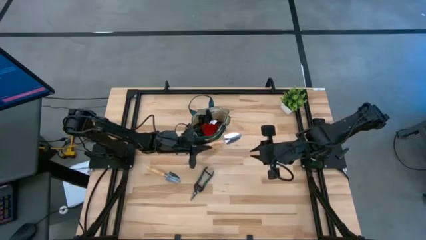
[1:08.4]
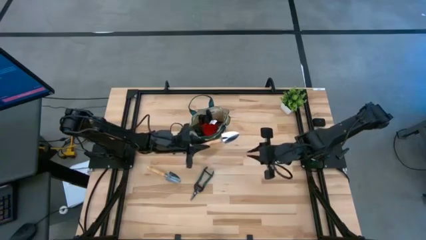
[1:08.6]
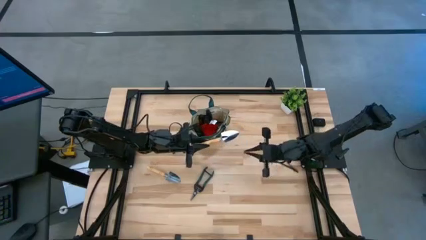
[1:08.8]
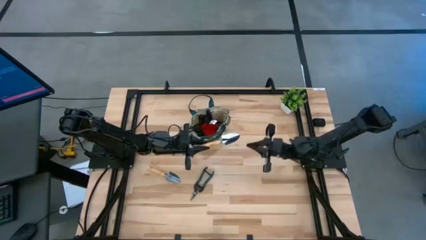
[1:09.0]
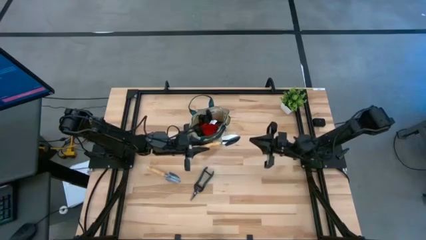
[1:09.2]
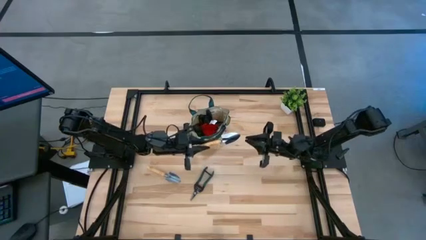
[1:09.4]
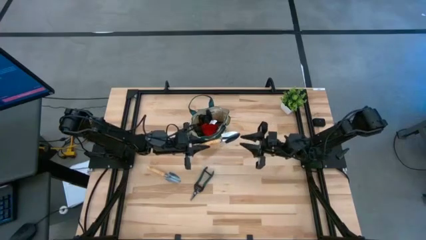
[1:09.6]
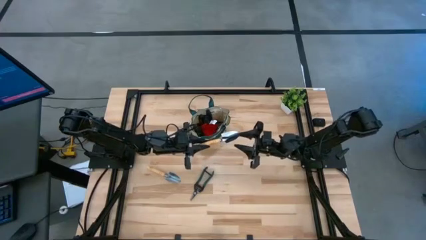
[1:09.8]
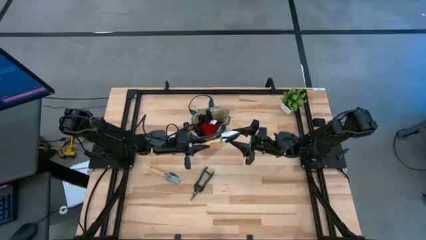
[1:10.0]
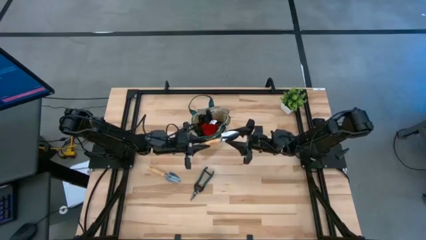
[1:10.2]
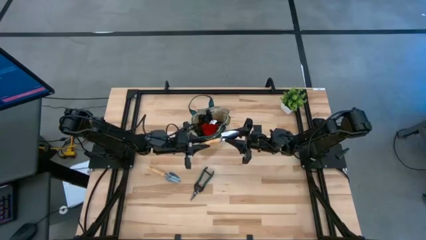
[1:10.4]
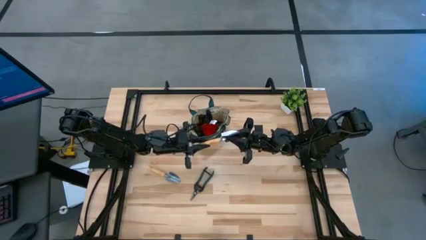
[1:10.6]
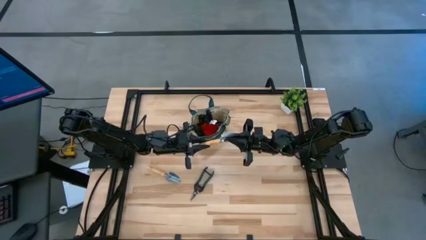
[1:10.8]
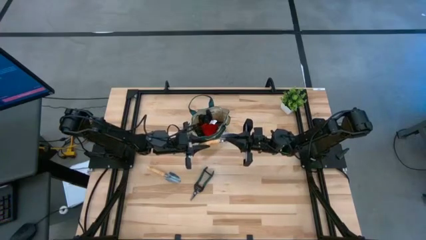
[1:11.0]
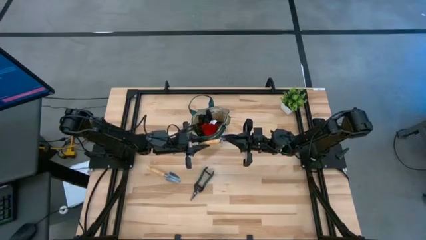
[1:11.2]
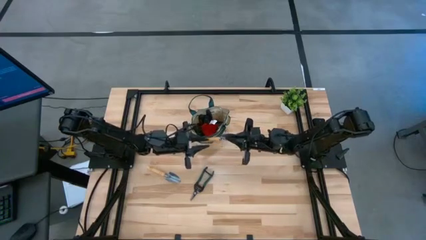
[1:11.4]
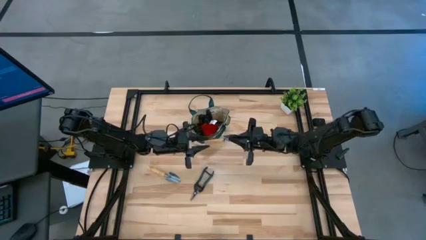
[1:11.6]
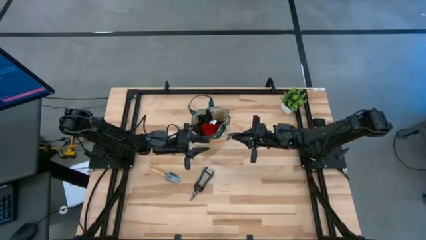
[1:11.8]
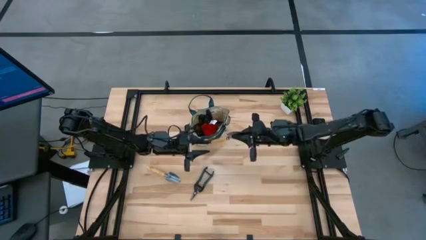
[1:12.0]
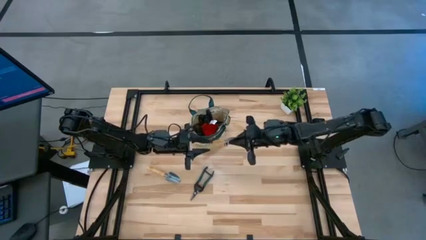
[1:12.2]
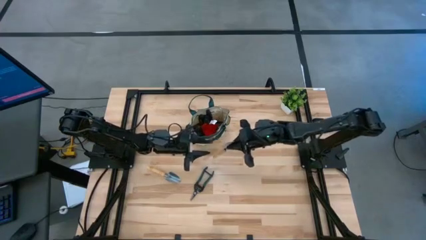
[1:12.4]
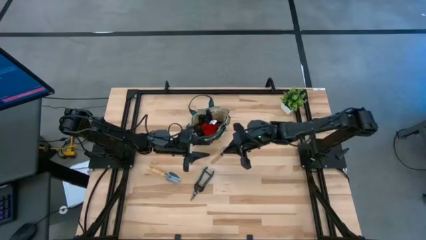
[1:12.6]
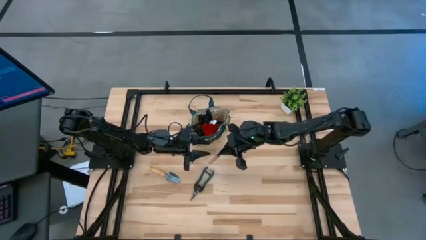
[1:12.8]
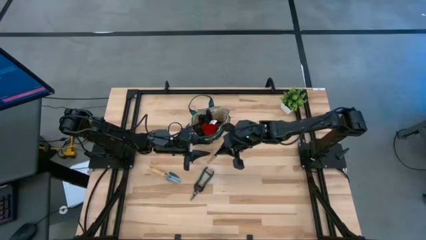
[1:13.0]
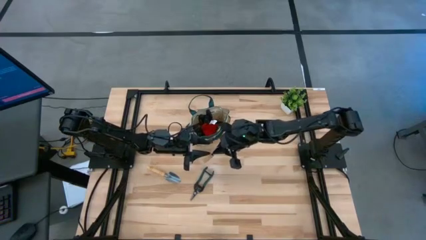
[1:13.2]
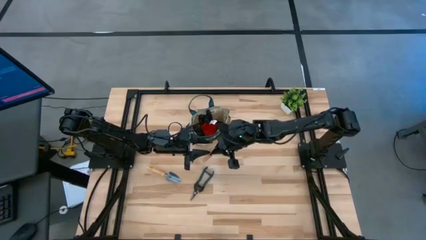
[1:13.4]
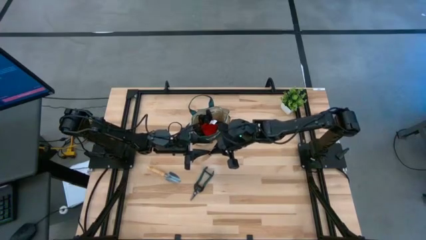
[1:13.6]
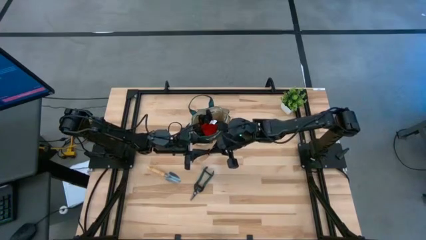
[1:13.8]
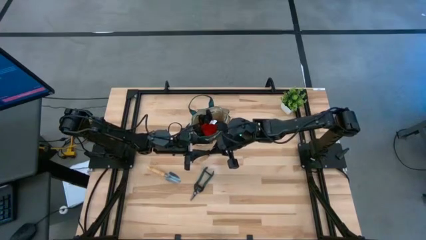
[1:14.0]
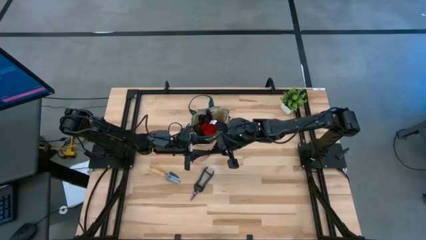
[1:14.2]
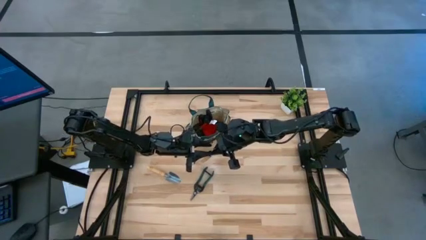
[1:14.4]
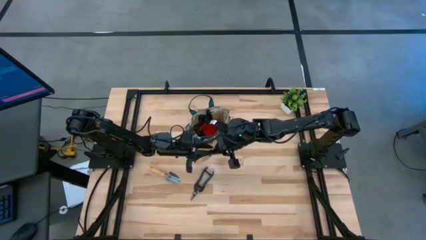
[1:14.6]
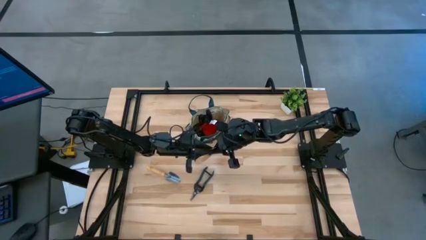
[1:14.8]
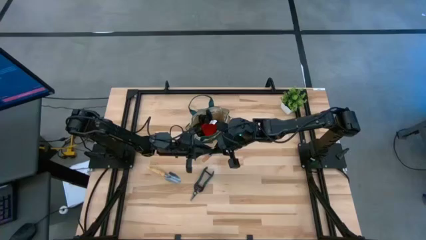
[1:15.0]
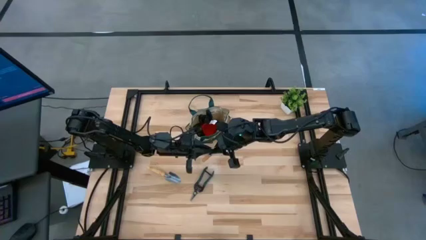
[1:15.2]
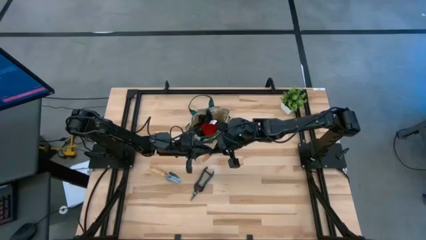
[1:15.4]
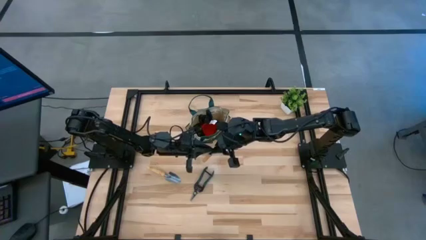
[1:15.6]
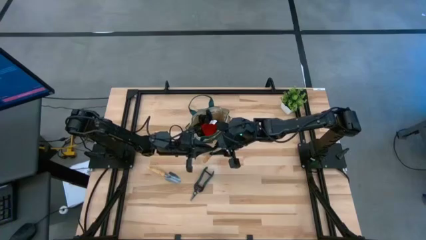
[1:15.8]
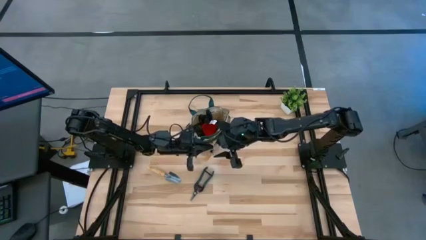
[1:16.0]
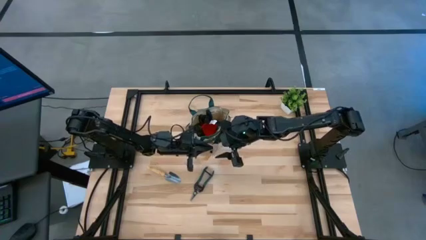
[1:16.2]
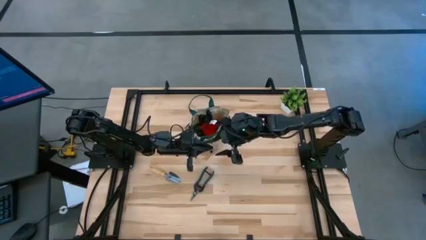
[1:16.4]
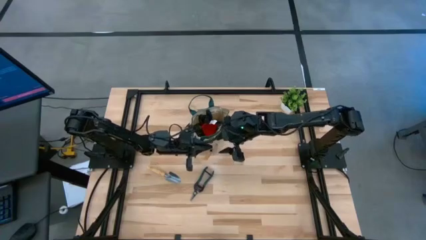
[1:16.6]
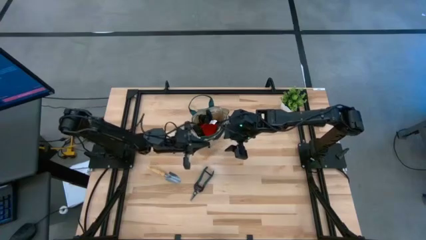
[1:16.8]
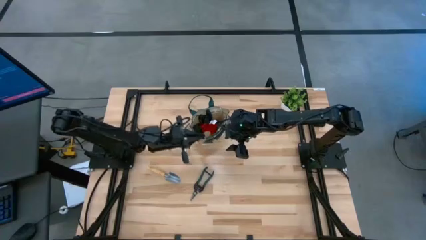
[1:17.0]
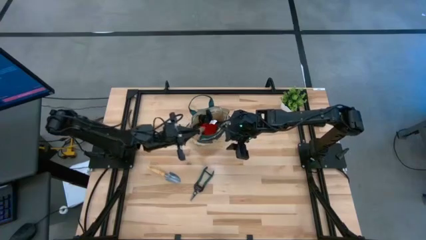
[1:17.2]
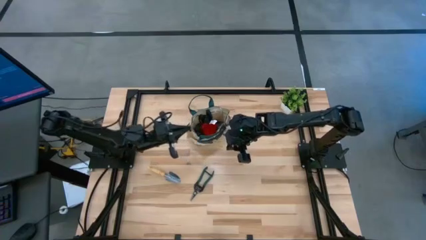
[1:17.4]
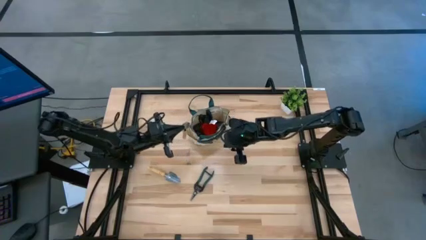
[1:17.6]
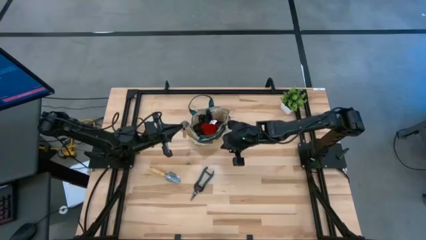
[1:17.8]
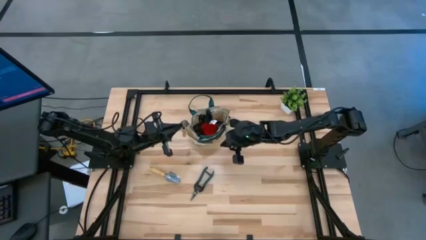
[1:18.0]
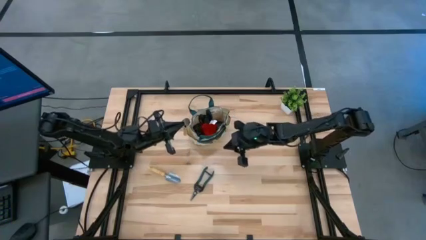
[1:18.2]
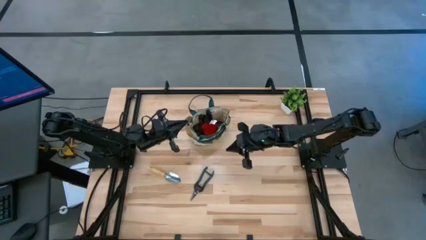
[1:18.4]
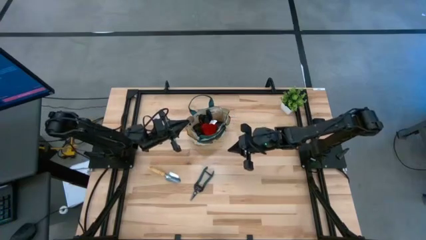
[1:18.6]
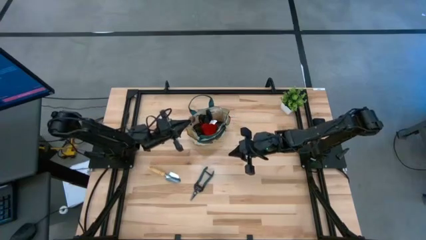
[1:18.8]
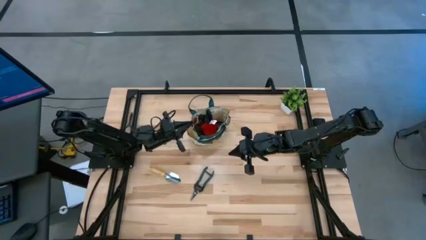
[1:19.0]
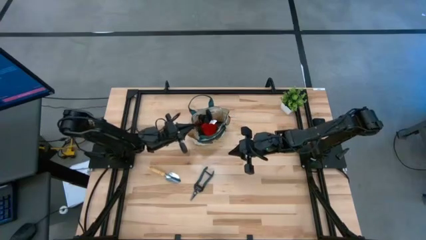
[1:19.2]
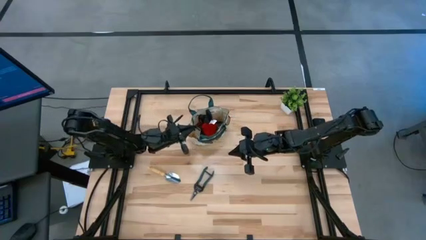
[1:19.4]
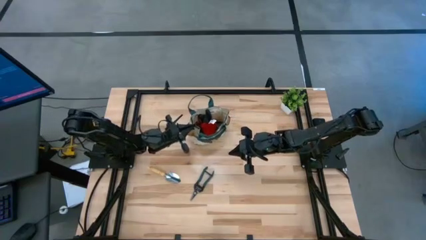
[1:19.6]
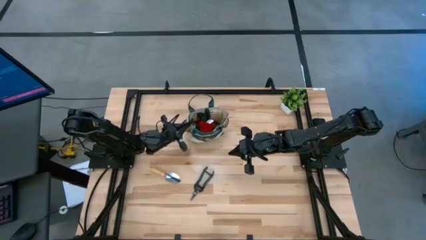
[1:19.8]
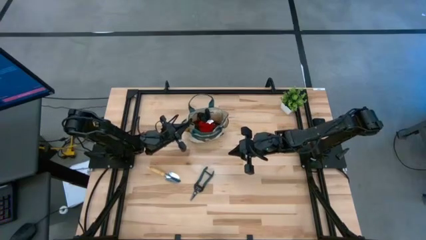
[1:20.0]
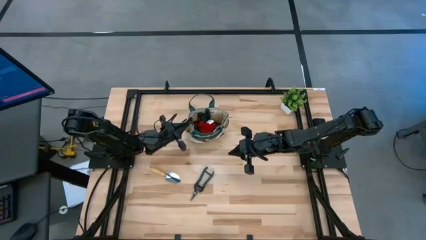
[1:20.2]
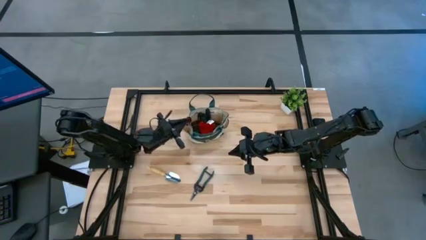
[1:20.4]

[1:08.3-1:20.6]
Task: Pick & Place Garden tools in Gardening bag
Put the brown right trowel into the brown gardening bag

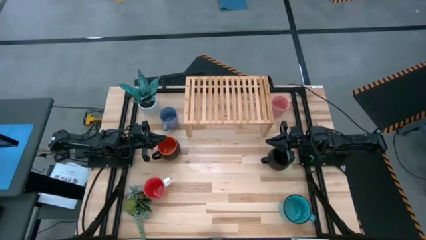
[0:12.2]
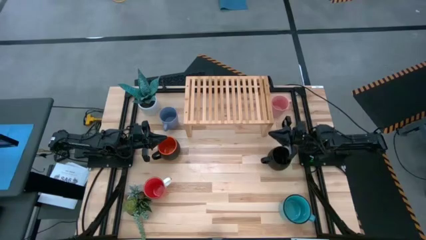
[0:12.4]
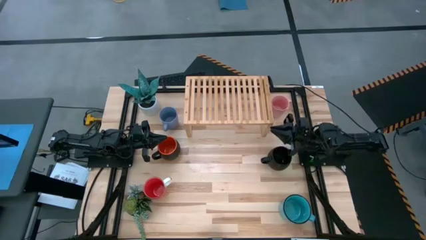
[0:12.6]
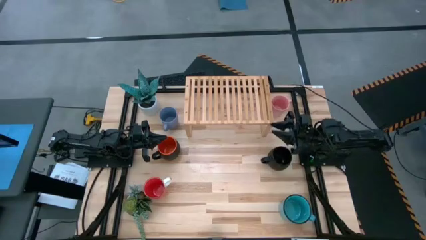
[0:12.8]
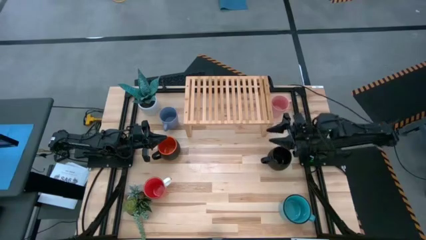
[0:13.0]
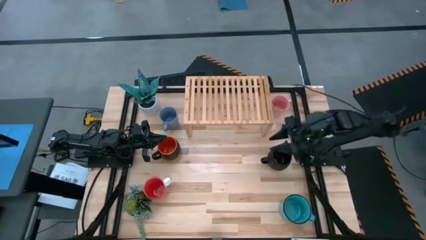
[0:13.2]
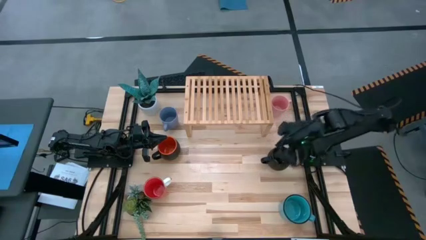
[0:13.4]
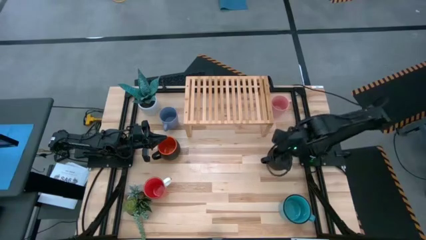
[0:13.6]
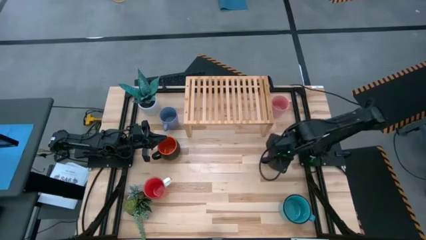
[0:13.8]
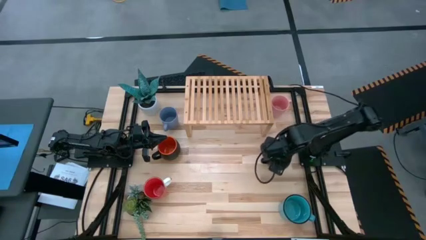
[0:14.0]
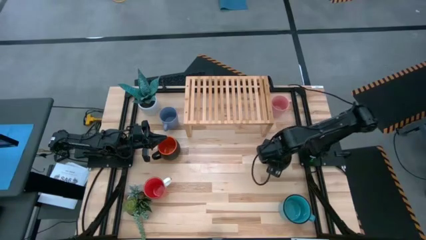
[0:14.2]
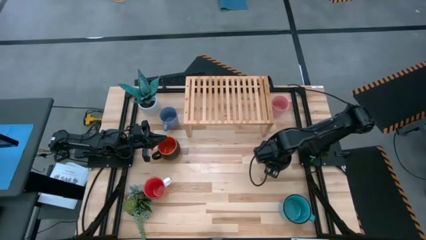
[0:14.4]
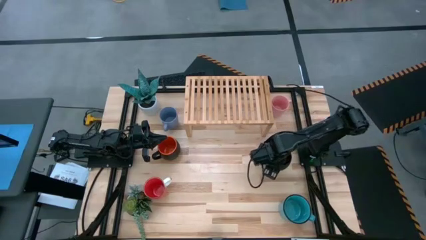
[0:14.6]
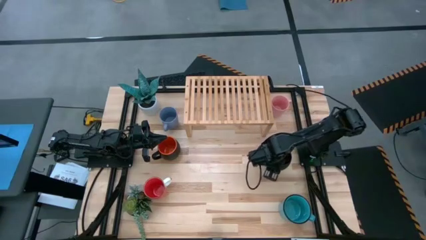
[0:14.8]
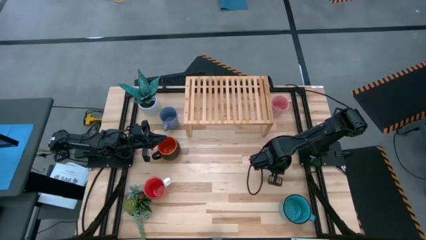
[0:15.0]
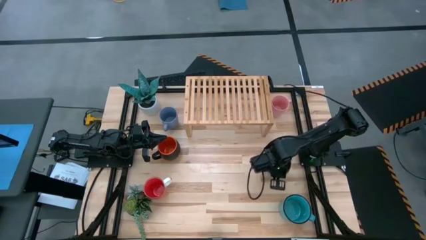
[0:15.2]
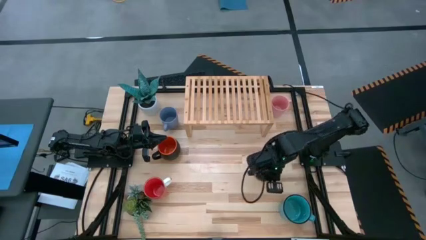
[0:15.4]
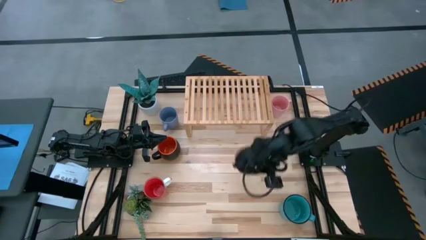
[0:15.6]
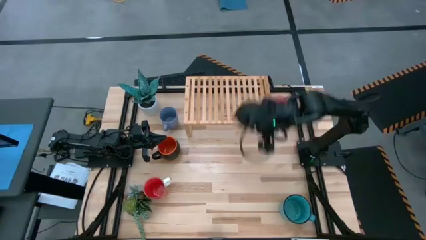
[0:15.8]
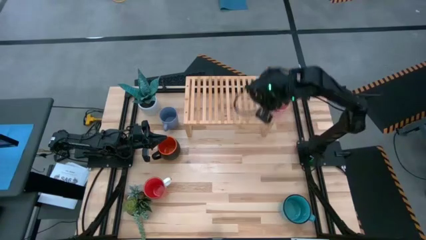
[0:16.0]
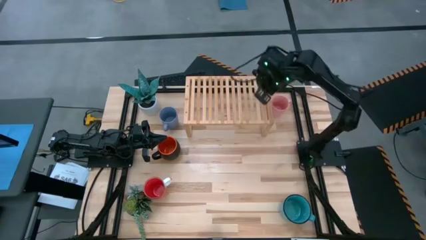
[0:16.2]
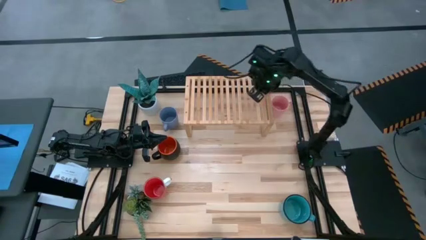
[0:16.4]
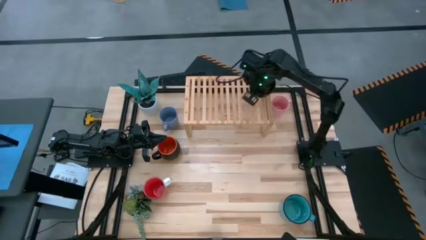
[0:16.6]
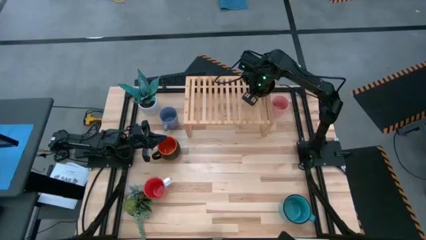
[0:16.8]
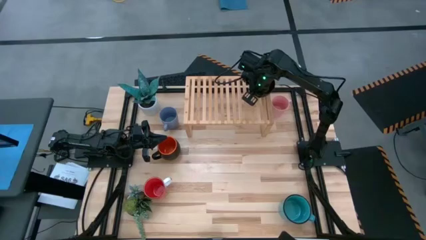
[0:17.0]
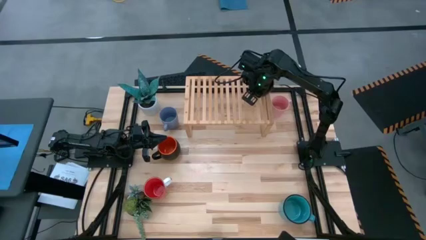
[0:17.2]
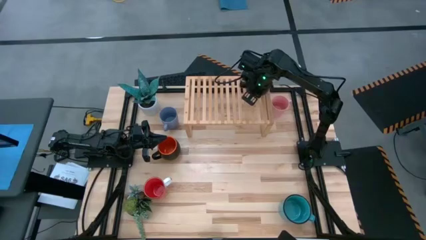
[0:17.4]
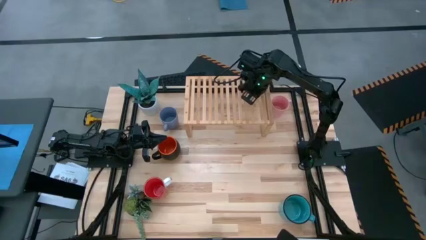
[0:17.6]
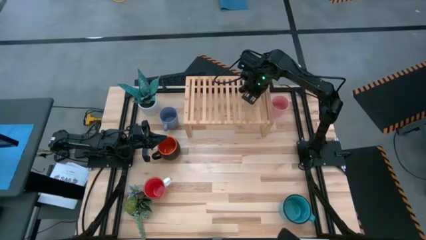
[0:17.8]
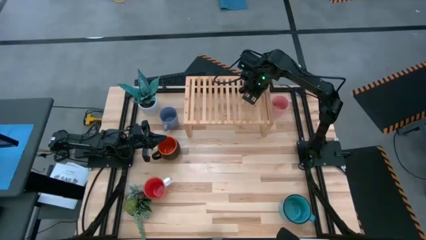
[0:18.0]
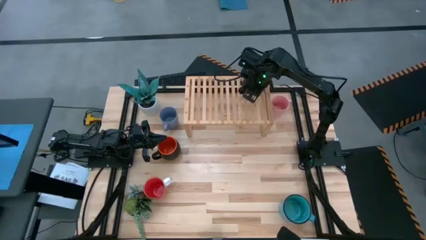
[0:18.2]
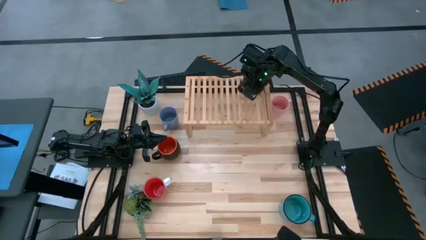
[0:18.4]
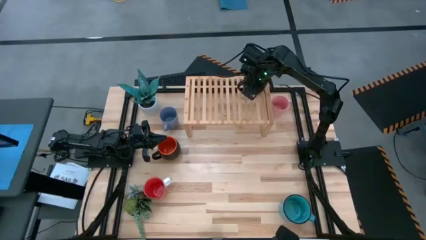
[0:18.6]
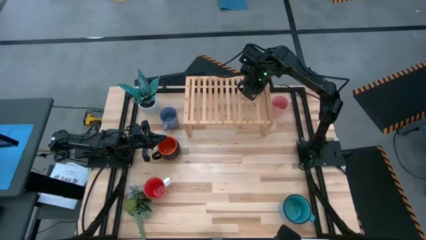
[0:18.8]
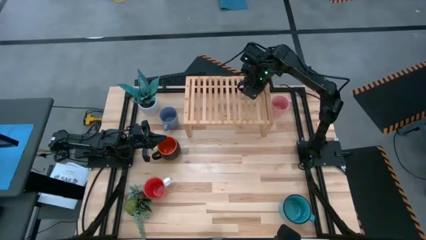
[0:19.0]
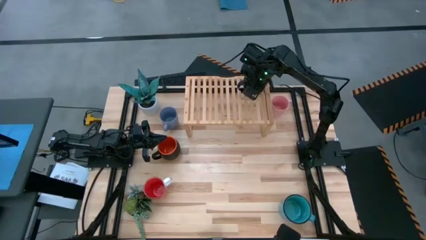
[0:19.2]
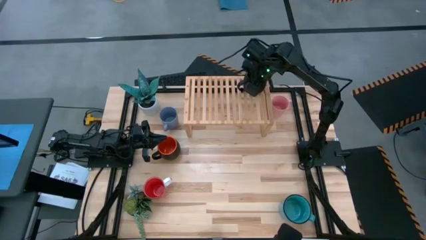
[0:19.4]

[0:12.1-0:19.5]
Task: Place coffee mugs
Put the black mug on the shelf
